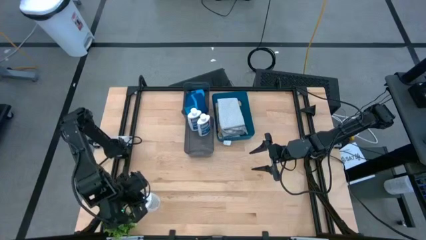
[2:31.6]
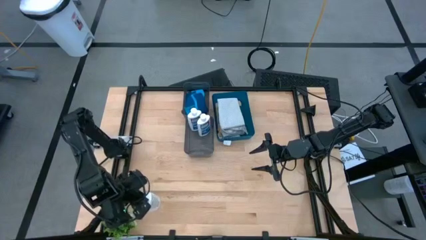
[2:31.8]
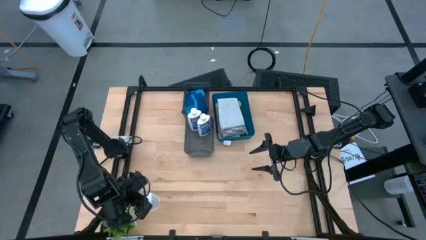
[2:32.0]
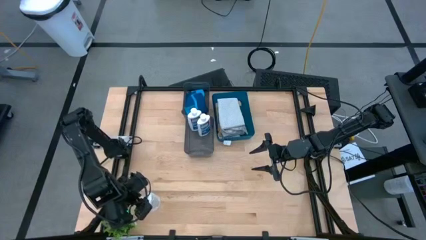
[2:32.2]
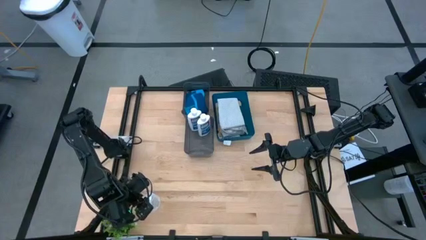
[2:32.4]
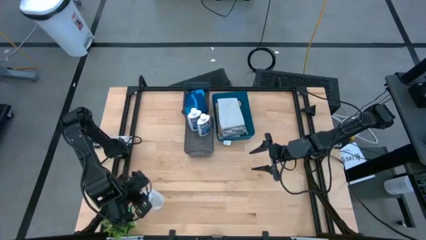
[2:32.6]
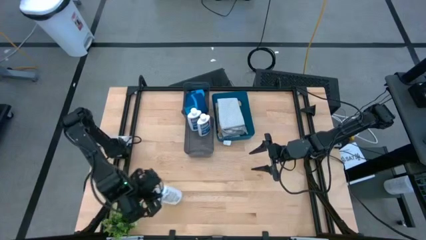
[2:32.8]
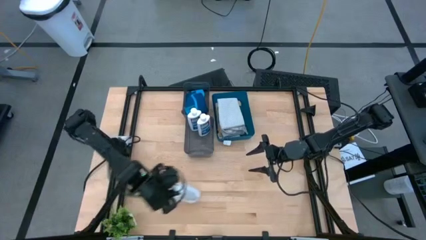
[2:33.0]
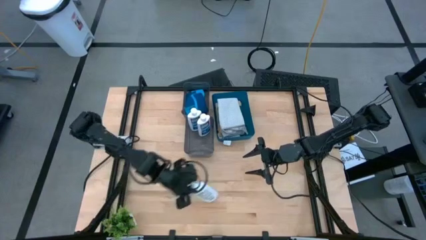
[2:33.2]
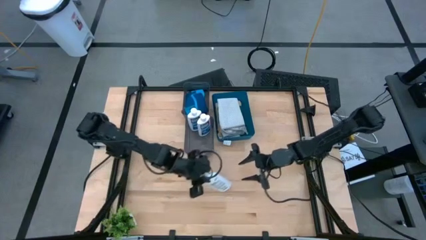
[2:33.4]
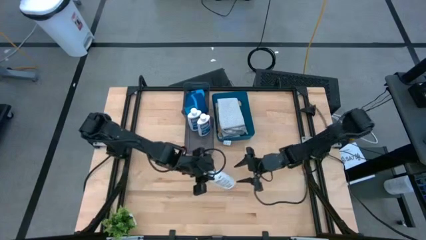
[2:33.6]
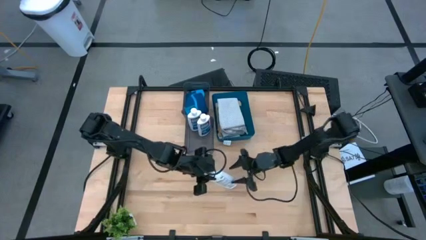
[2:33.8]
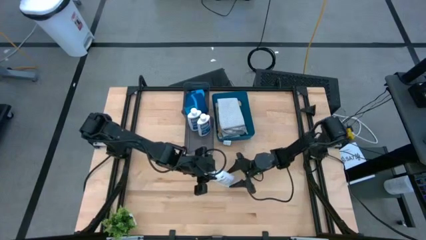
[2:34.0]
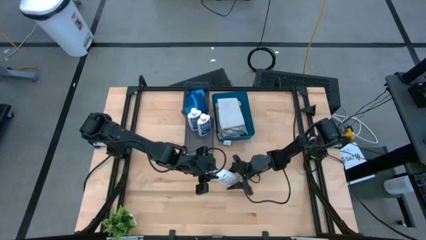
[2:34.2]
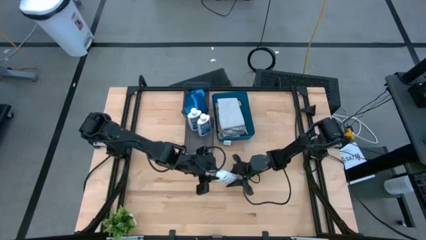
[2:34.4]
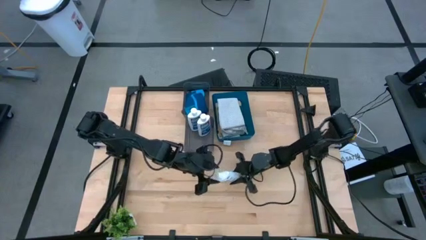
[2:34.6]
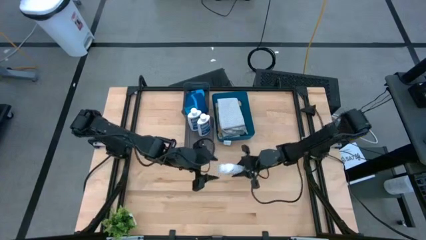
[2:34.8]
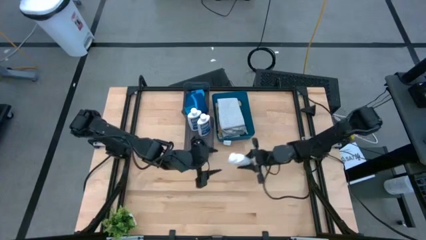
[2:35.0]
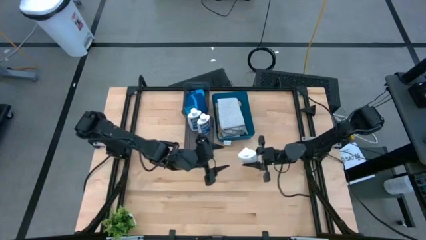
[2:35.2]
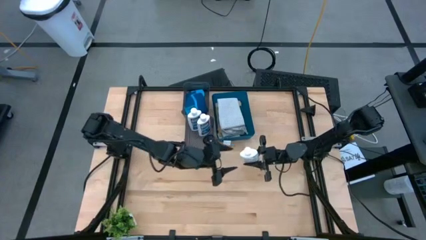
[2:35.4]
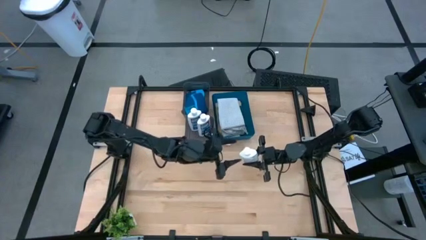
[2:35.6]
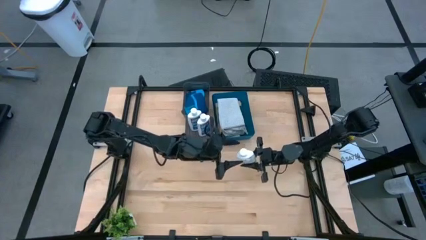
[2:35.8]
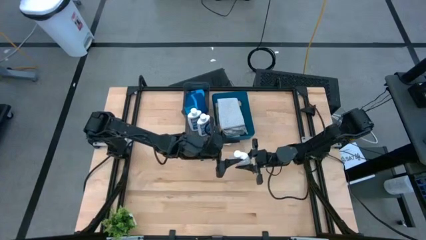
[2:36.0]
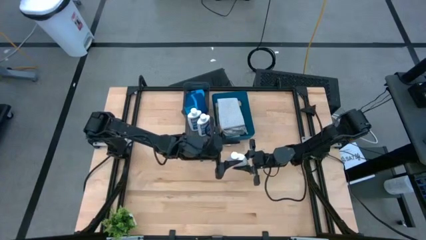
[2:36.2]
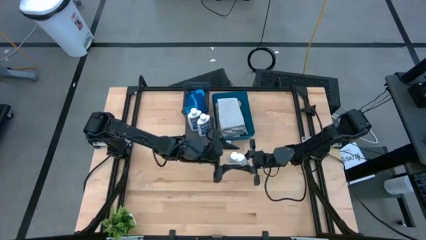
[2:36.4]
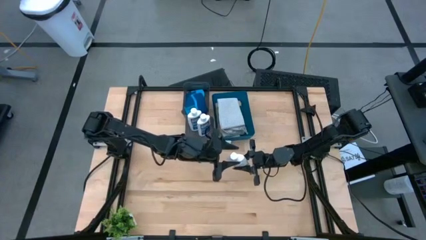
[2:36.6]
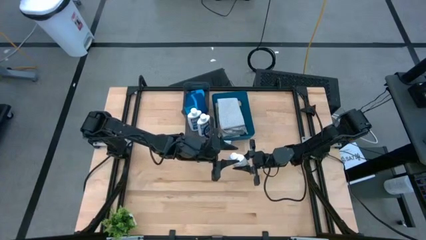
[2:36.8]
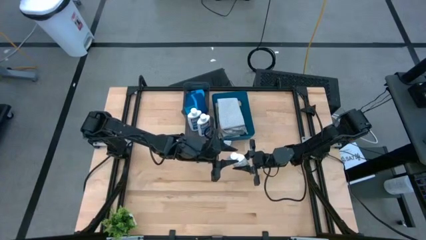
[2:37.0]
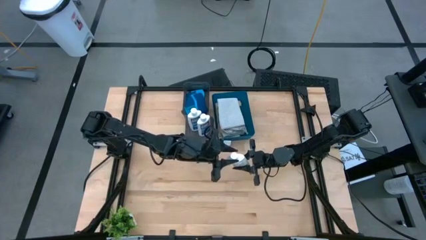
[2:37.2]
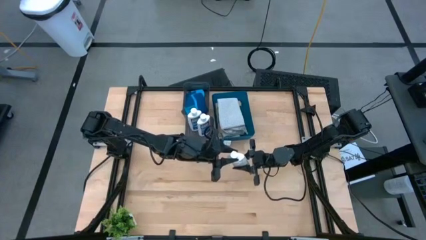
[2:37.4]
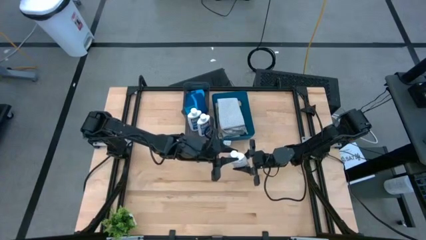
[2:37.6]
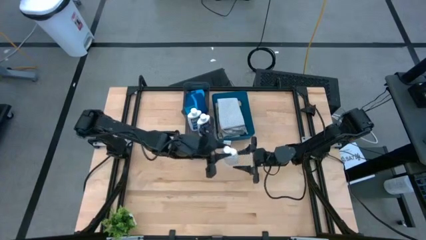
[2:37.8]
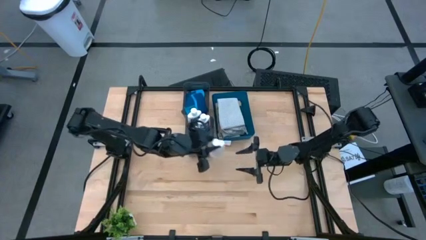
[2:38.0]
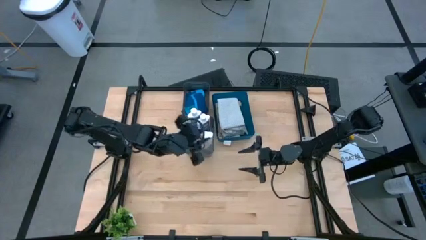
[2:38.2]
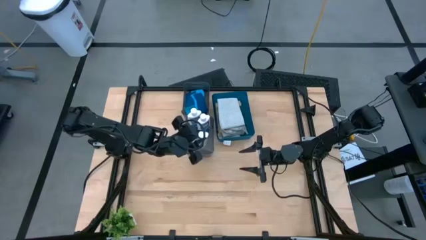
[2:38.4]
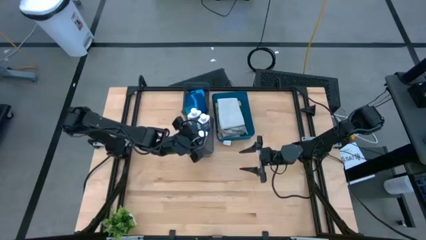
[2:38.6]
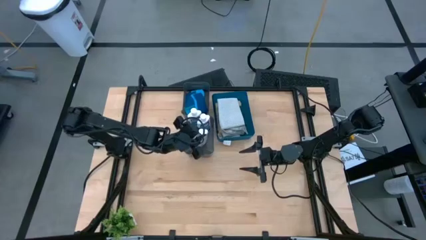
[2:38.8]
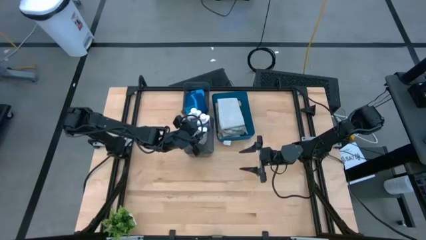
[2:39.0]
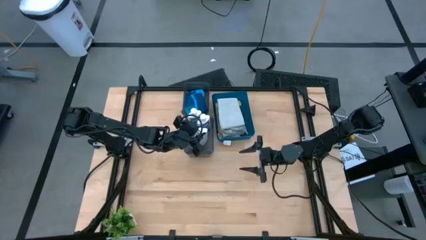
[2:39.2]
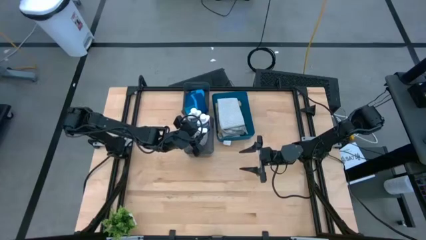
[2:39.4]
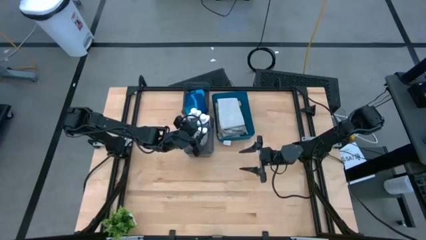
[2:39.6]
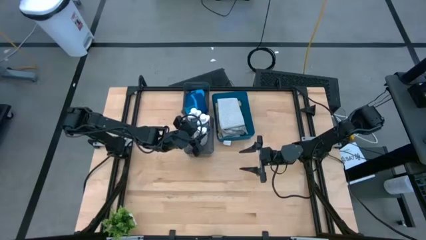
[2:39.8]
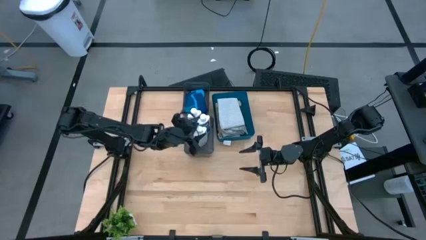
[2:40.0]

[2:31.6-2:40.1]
Task: Pick & Place Kitchen Items
Put the white plastic restorer bottle into the bottom black bin

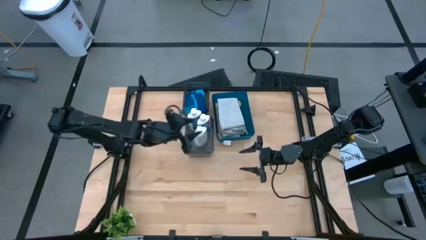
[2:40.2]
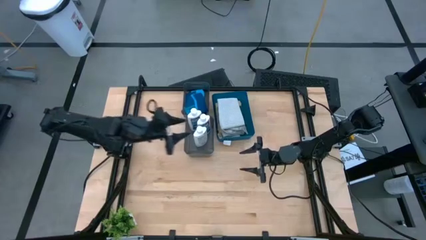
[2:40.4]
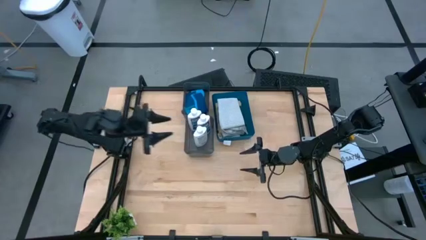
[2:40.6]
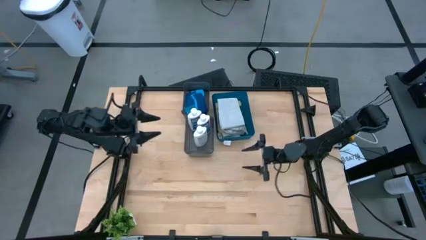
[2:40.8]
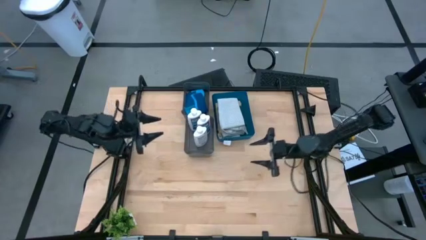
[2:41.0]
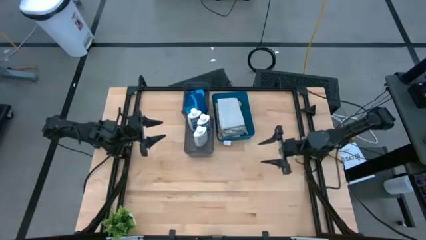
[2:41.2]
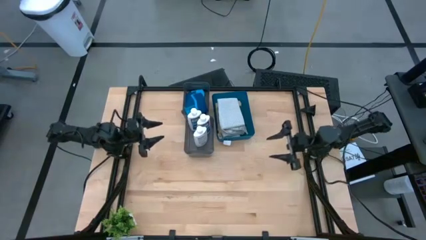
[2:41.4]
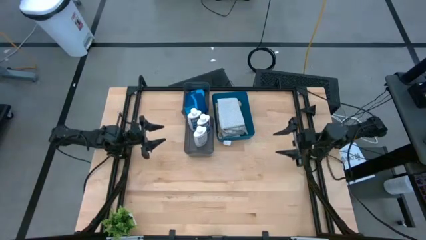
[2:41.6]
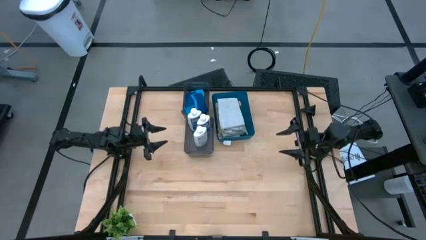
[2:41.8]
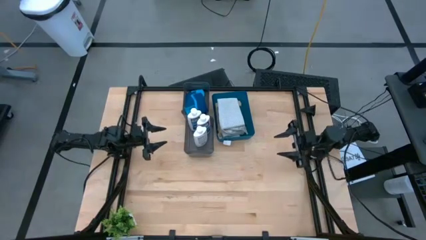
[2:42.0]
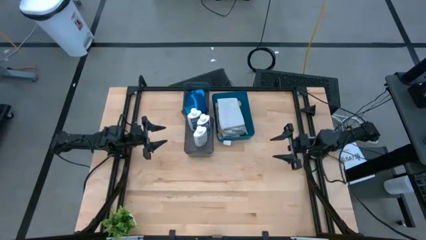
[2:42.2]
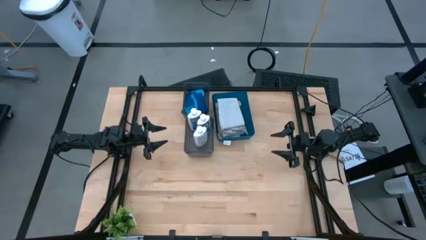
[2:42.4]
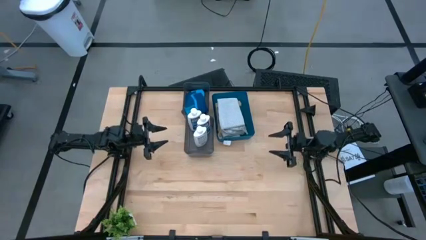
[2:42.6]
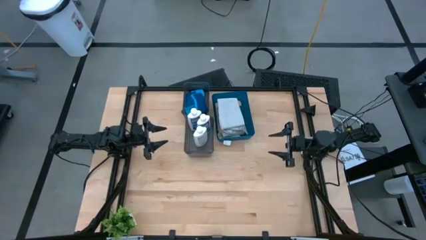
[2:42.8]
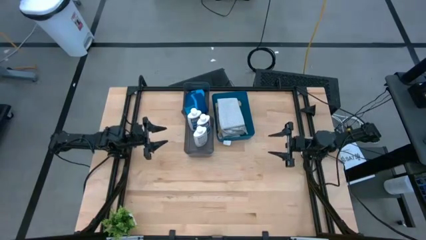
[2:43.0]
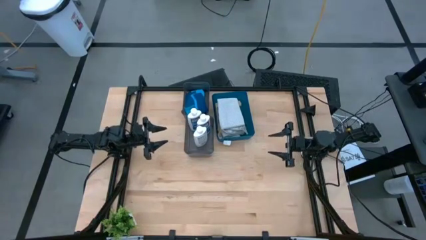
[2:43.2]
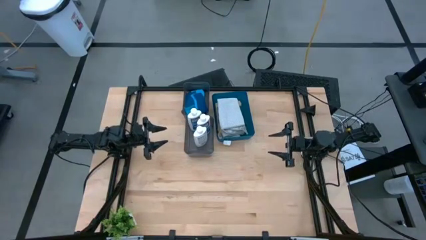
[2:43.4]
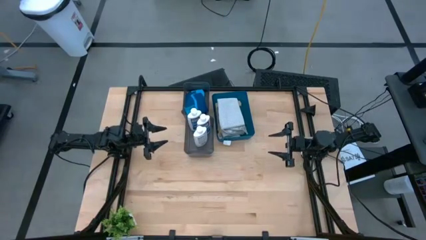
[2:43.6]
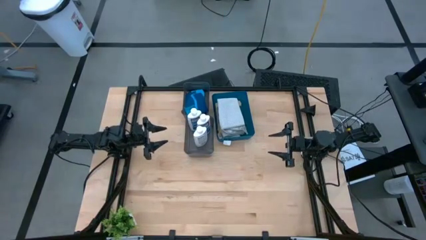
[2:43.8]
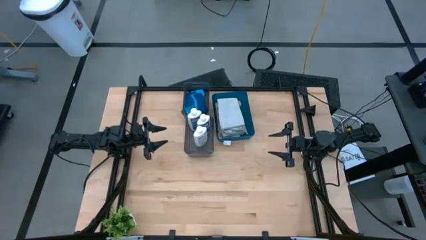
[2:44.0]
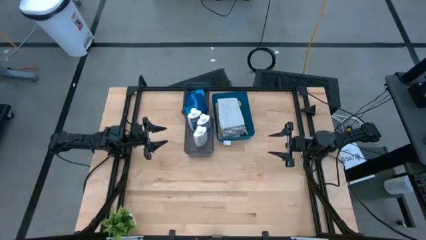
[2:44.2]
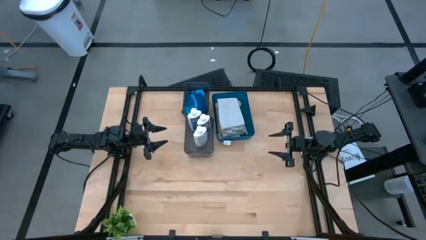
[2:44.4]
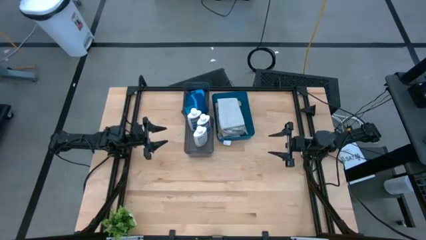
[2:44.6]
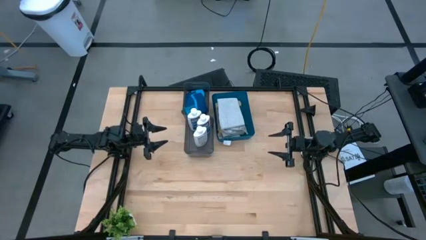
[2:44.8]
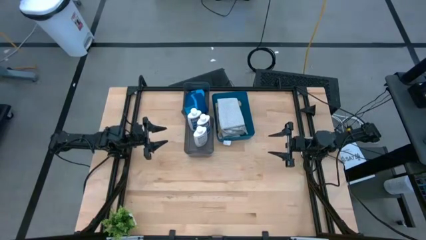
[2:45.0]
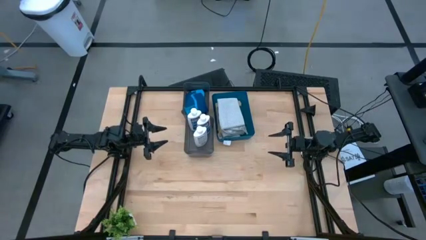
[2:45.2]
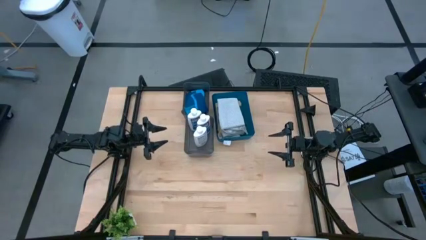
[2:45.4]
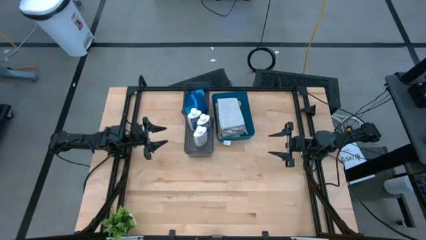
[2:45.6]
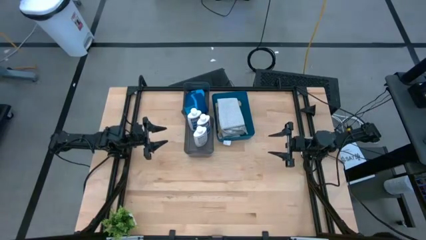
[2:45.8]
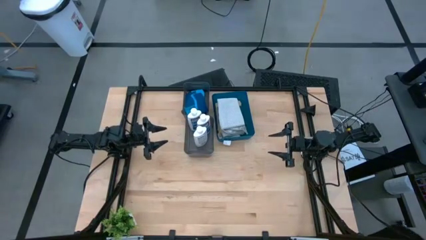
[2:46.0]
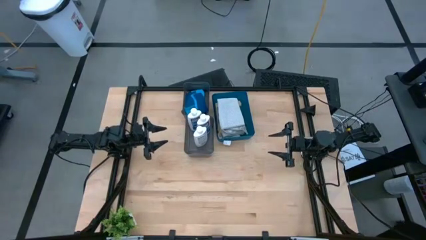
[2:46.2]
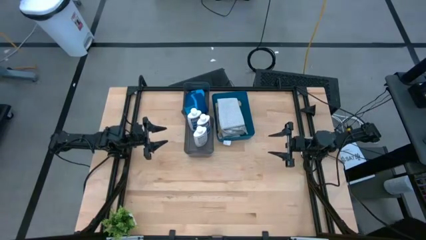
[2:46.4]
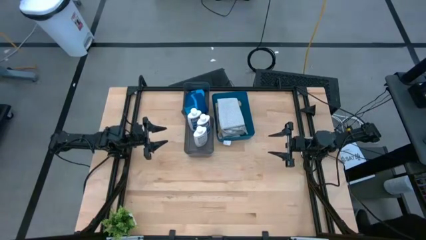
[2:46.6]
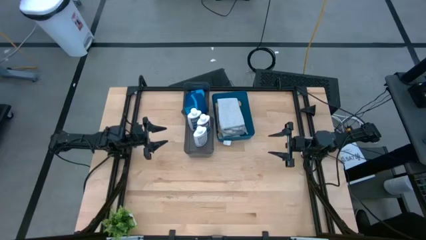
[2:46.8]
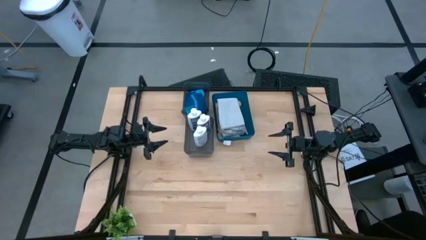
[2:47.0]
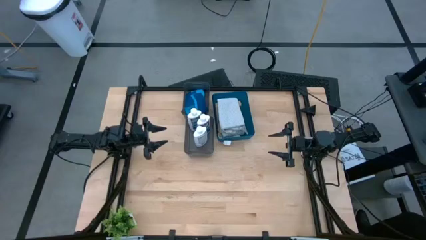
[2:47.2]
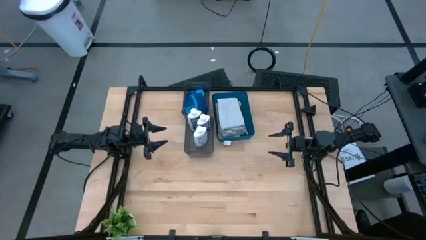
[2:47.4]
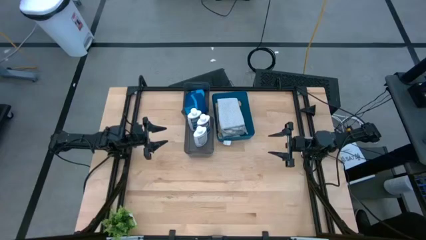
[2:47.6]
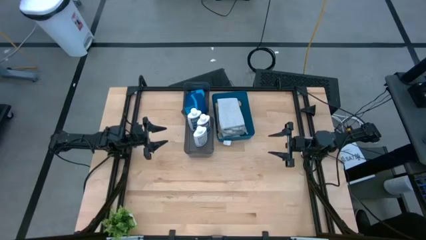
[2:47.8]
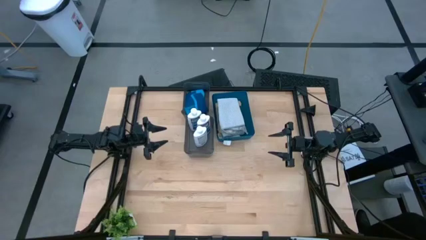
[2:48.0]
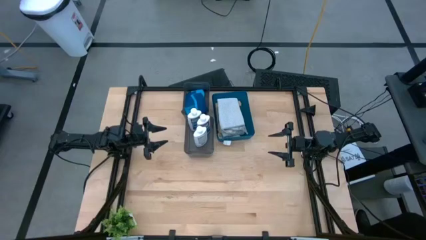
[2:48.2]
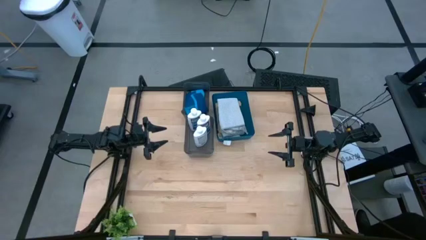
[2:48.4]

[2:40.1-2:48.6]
Return to Home Position
